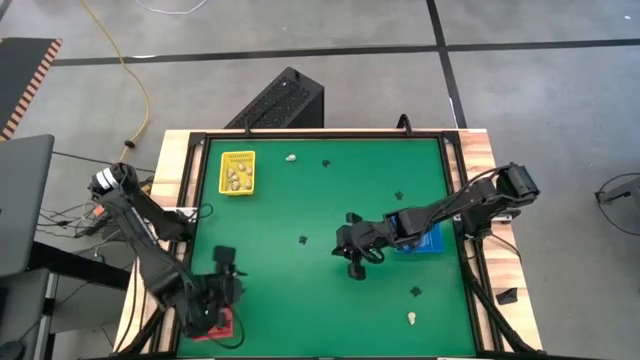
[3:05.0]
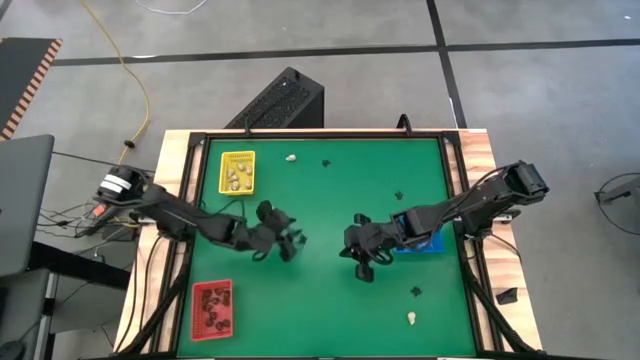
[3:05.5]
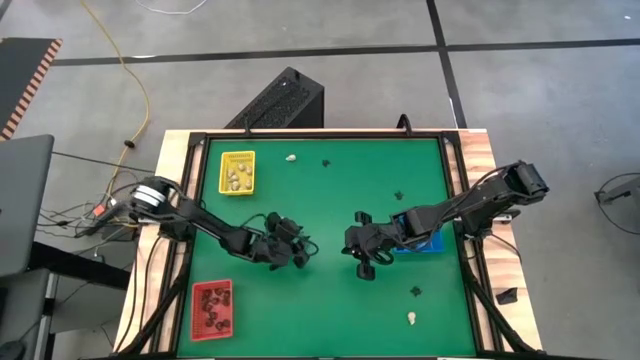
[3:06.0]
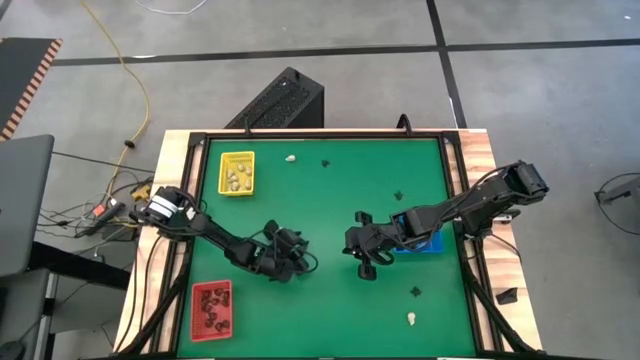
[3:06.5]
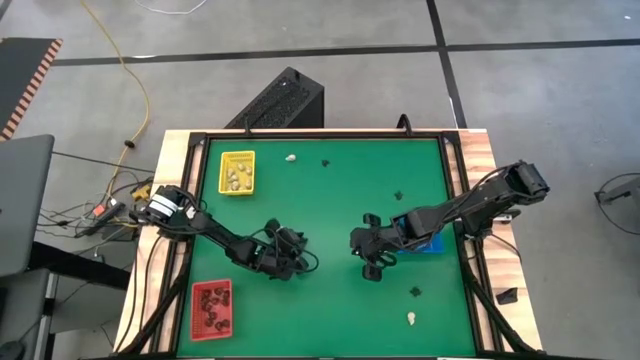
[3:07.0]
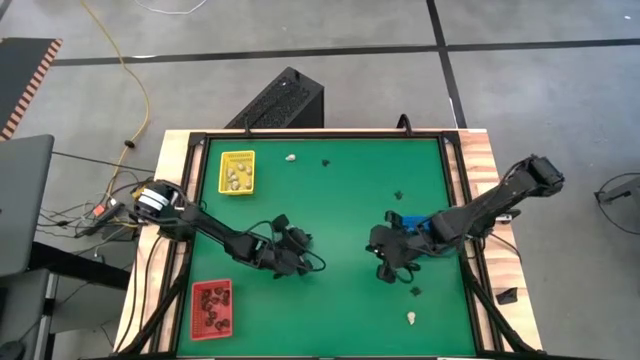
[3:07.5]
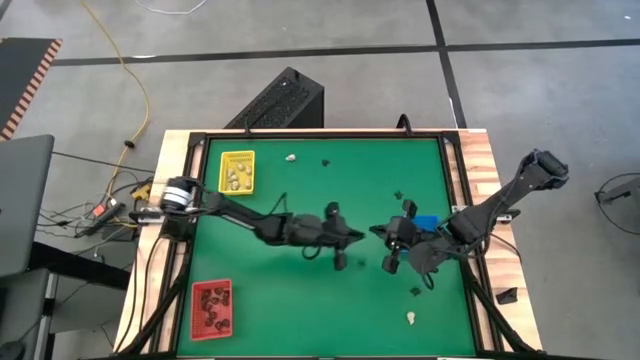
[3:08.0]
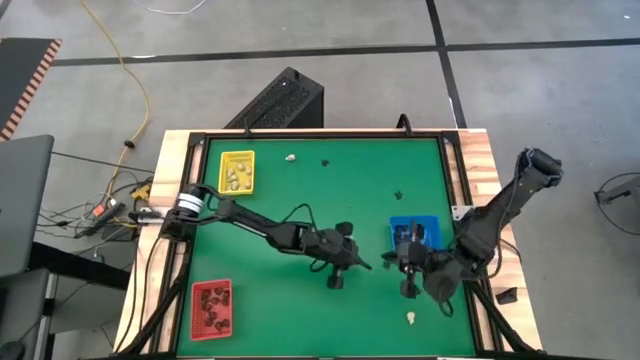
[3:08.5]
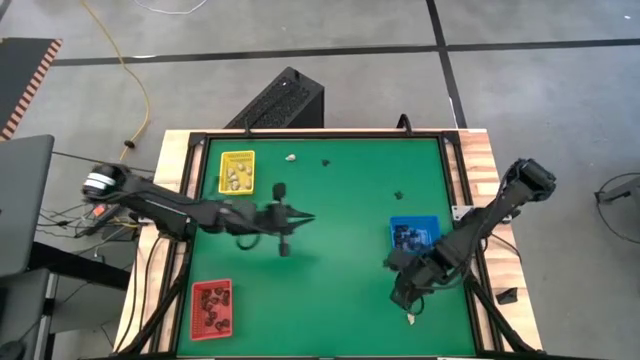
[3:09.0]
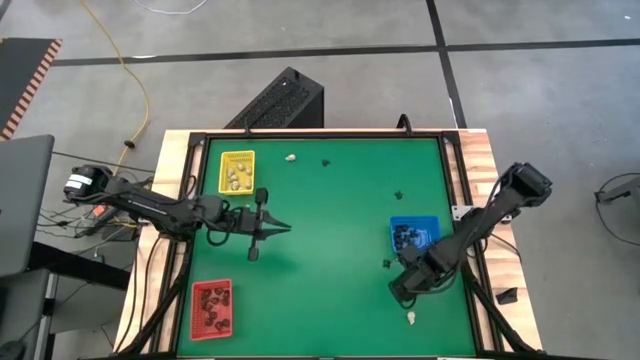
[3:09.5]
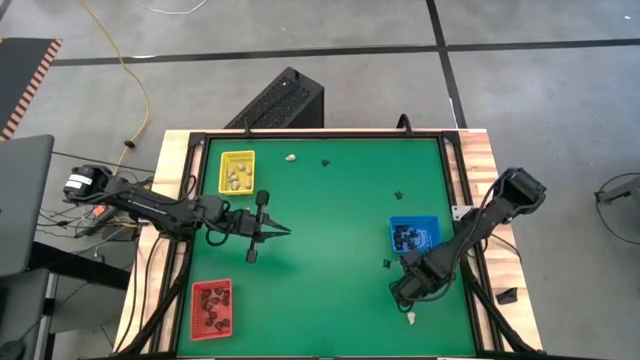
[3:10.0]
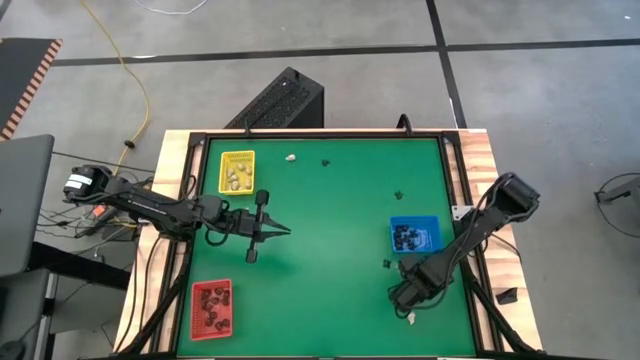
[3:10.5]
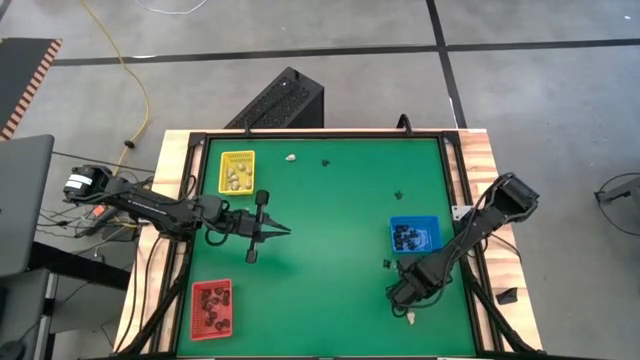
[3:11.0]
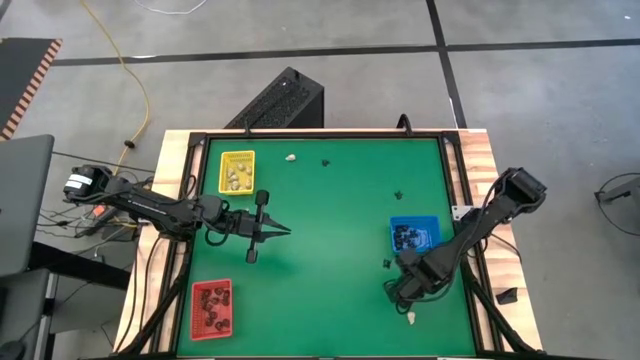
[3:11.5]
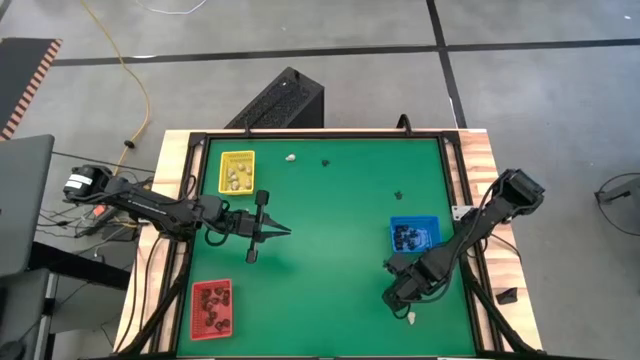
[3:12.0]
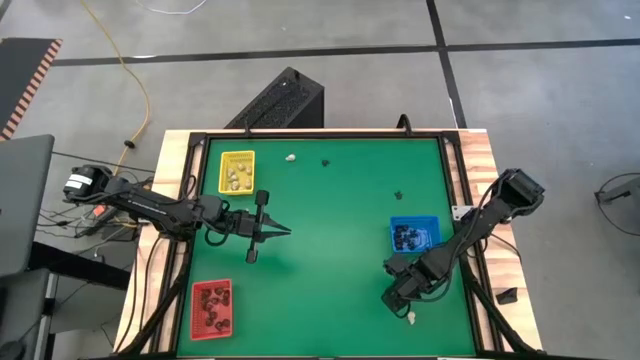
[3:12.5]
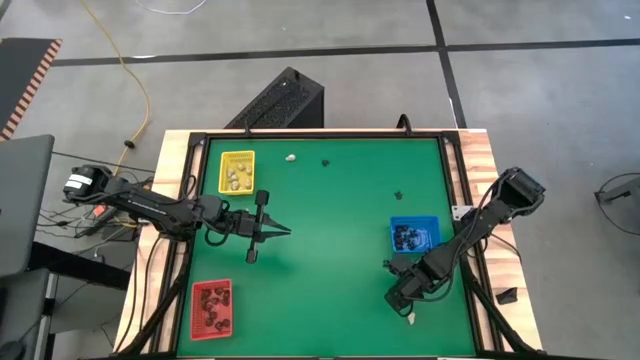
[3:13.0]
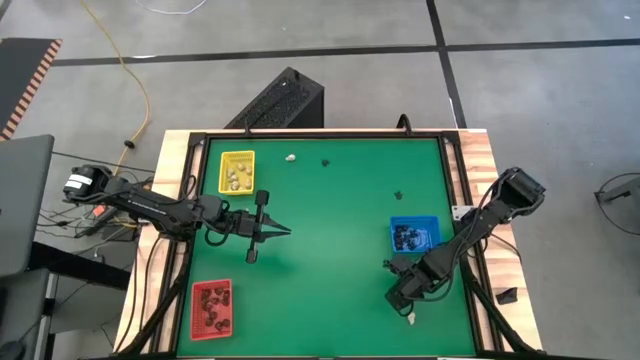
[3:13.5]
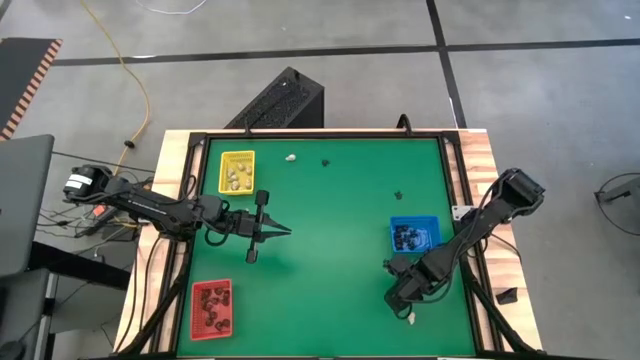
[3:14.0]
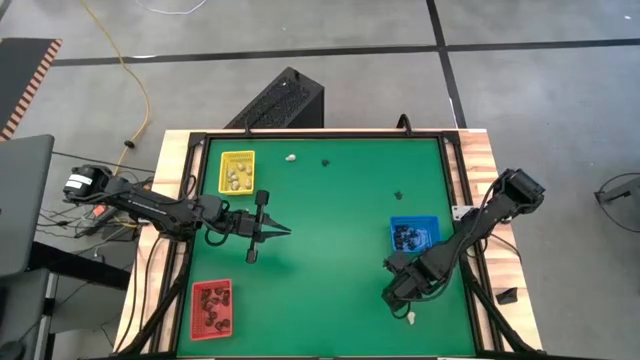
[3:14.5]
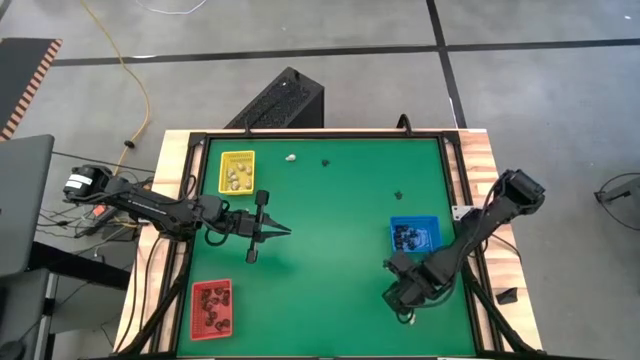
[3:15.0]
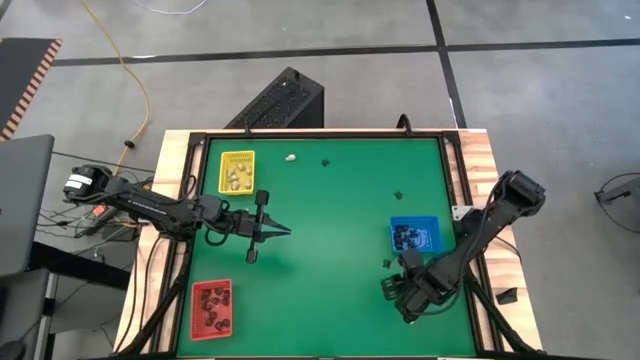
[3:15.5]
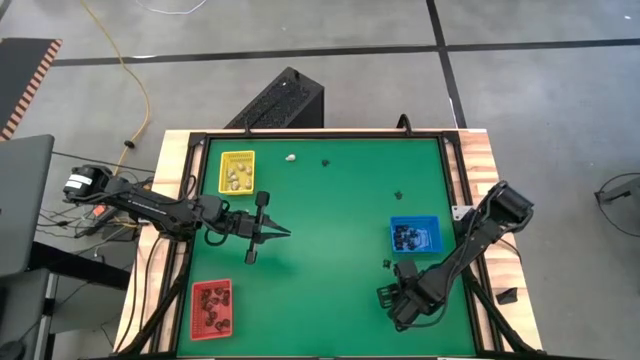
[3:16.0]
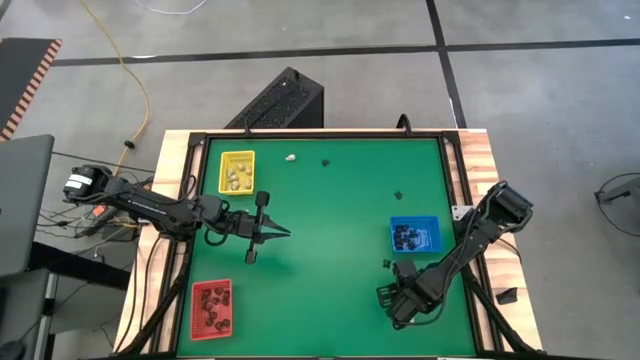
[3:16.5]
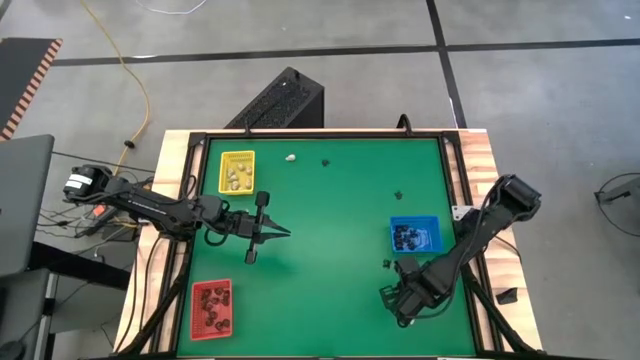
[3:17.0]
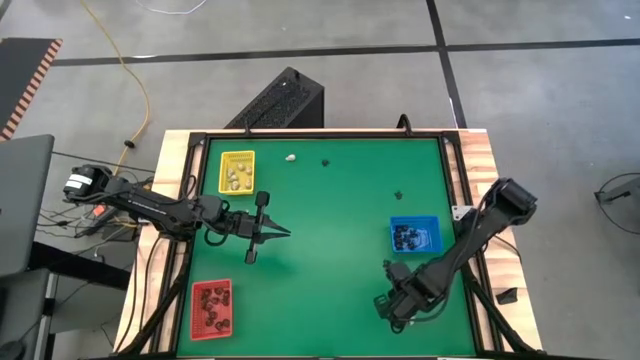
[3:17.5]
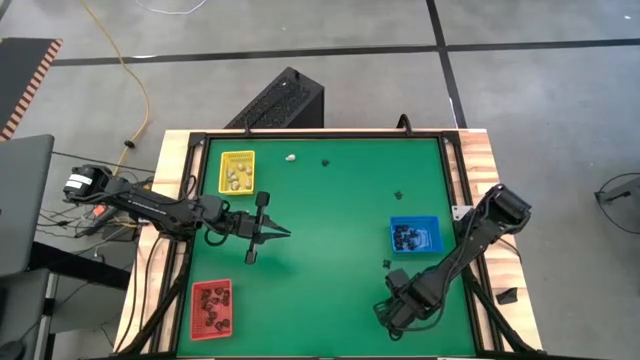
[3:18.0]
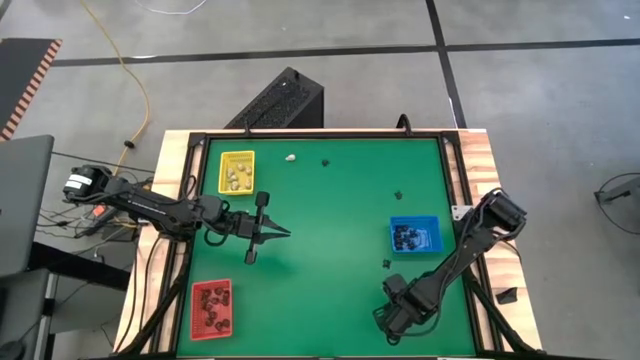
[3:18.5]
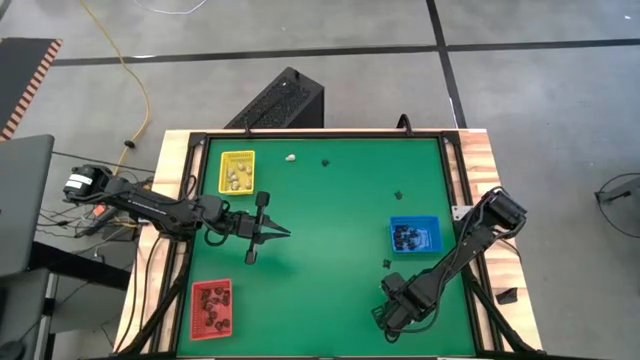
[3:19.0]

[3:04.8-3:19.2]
Task: Sort Halloween decoration
Put the black spider toy into the blue bin

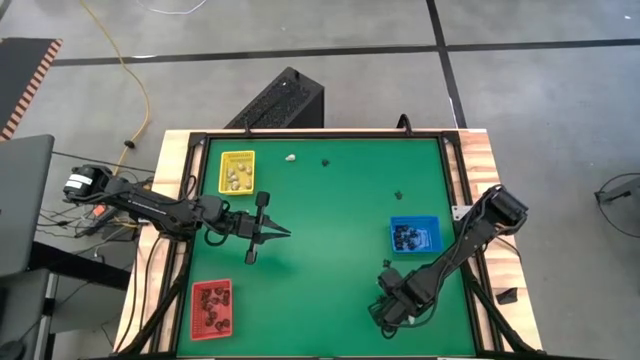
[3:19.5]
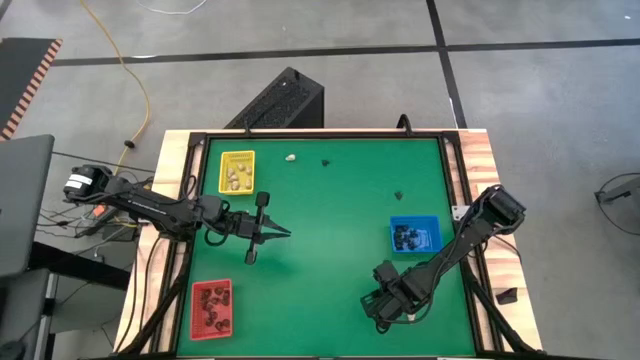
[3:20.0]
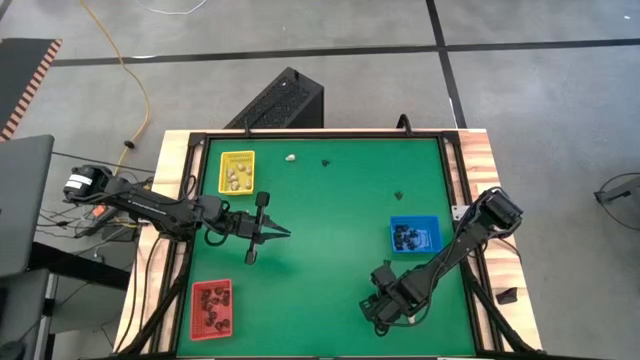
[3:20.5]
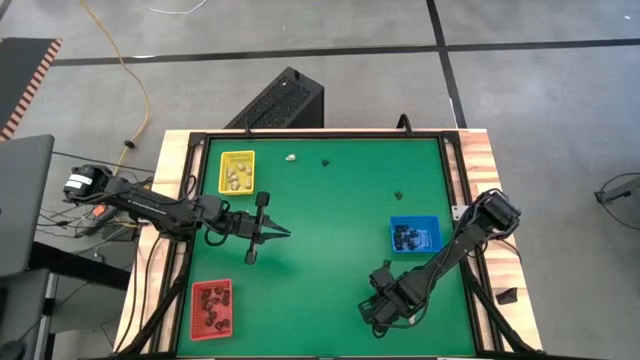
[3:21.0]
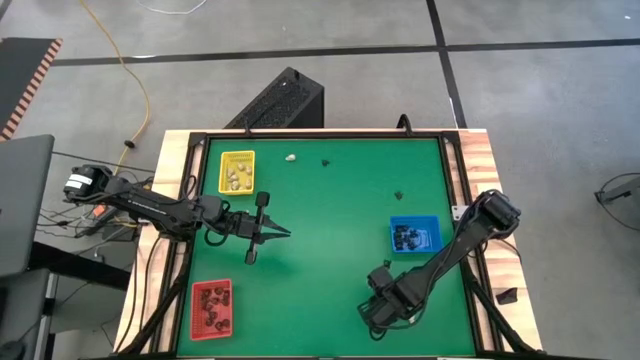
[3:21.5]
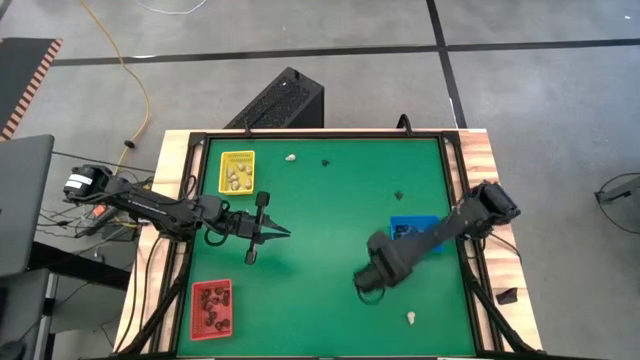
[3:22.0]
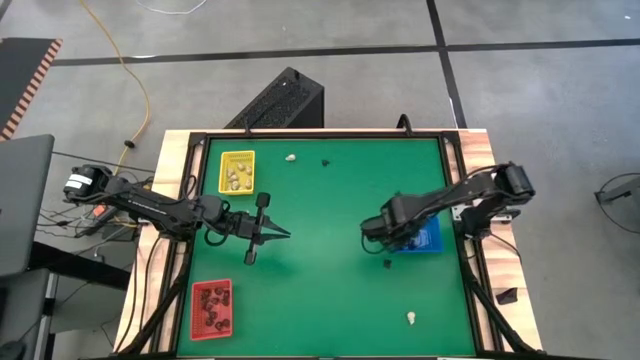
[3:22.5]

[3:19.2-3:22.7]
Put the black spider toy into the blue bin

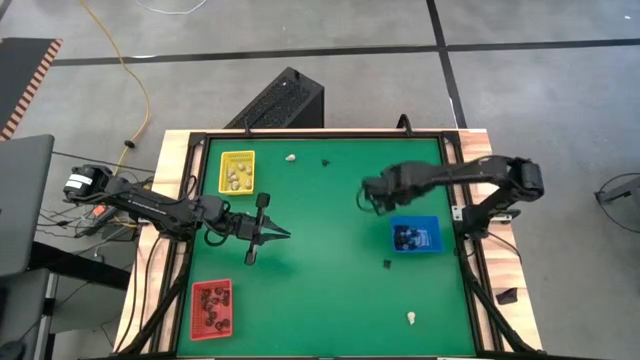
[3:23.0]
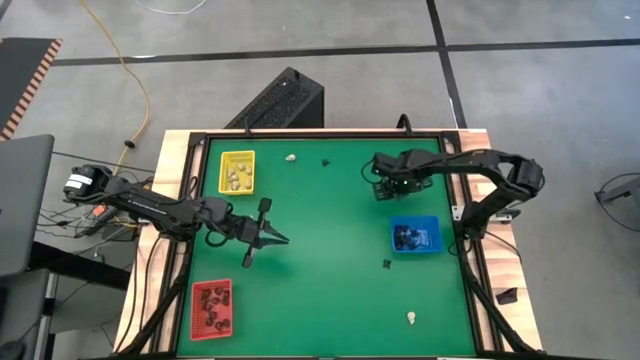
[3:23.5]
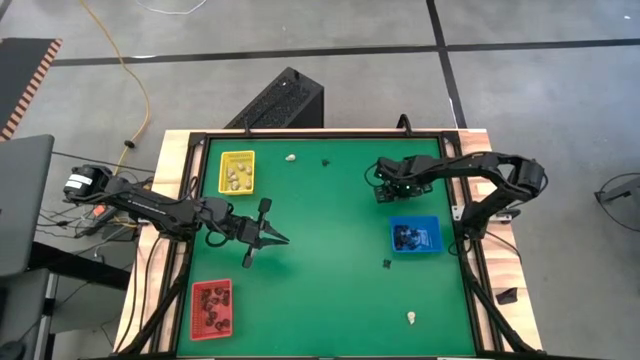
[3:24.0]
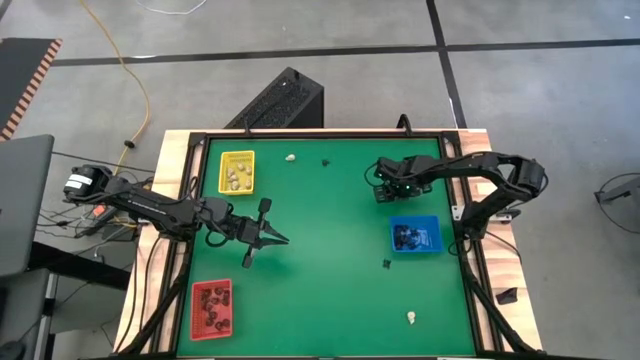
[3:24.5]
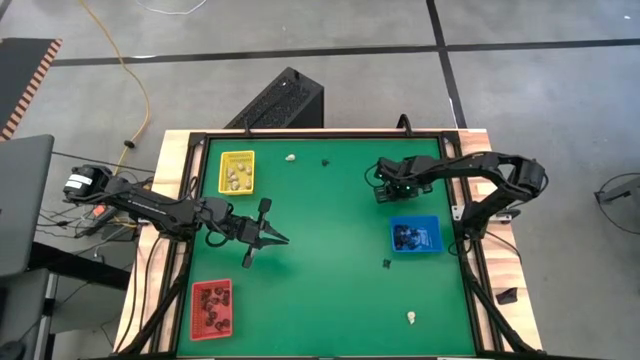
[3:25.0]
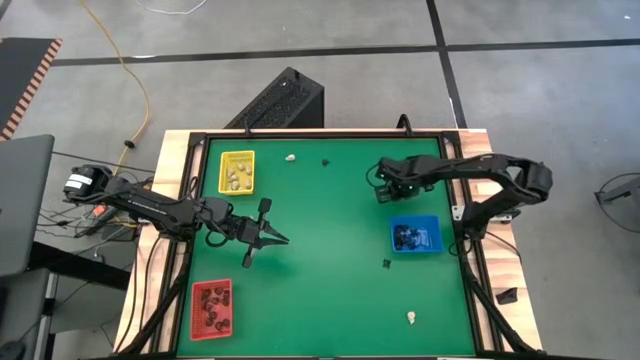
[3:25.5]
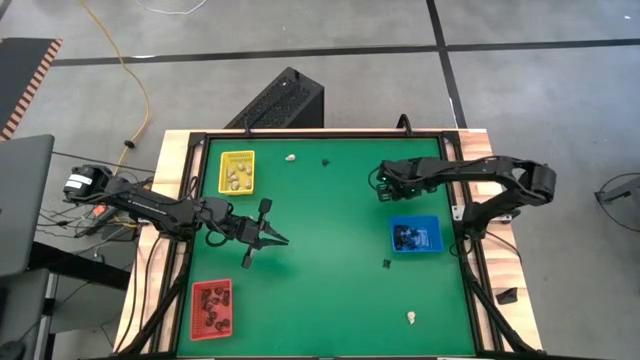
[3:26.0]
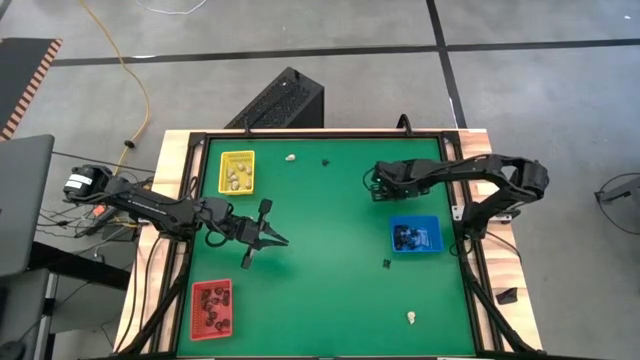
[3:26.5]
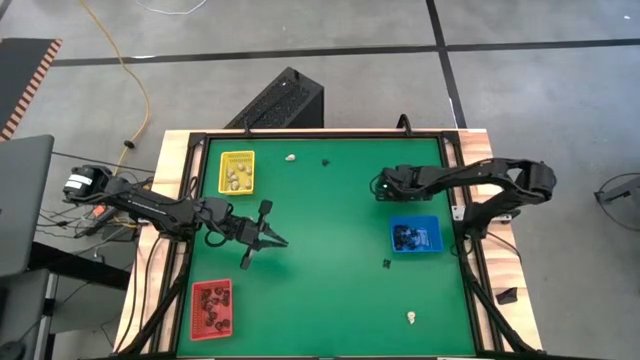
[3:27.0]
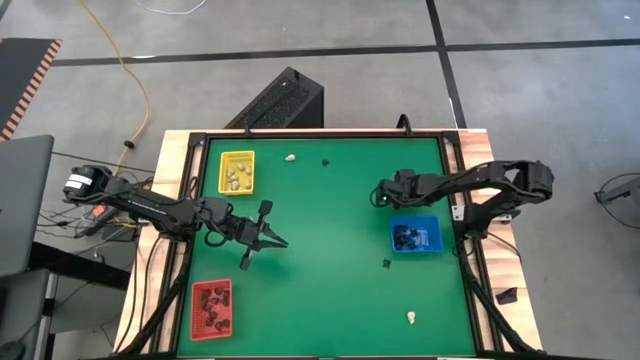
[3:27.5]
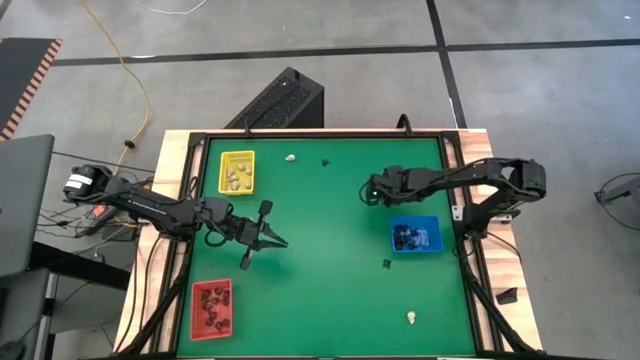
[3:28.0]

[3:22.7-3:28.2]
Put the black spider toy into the blue bin
